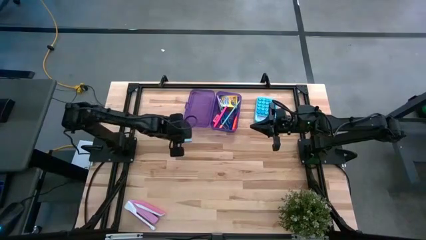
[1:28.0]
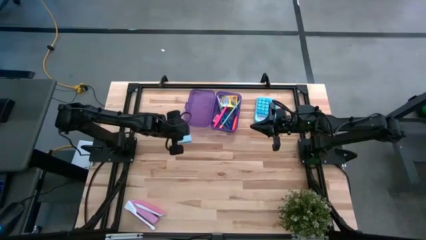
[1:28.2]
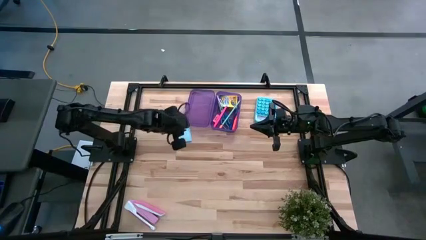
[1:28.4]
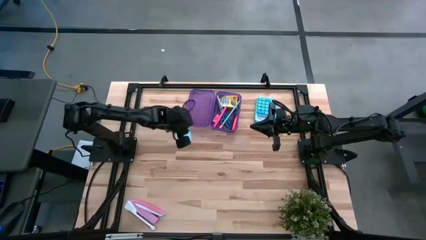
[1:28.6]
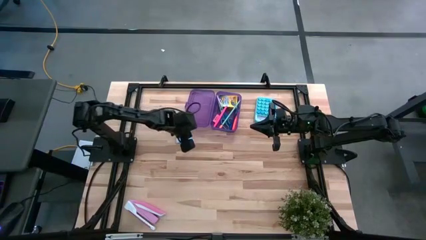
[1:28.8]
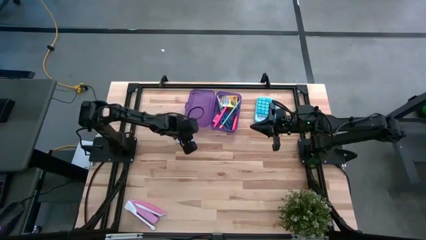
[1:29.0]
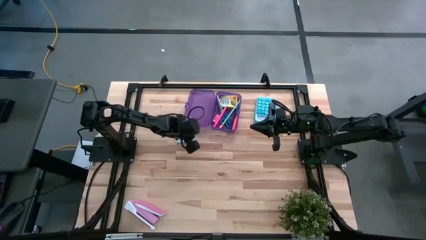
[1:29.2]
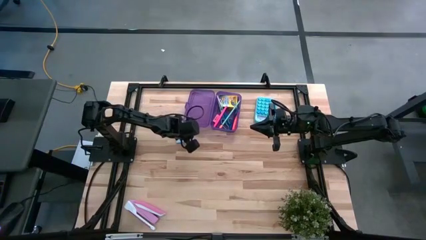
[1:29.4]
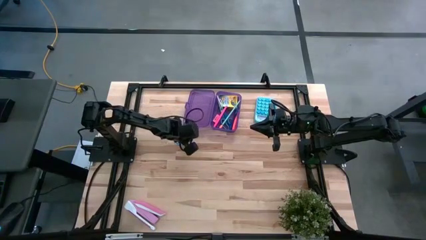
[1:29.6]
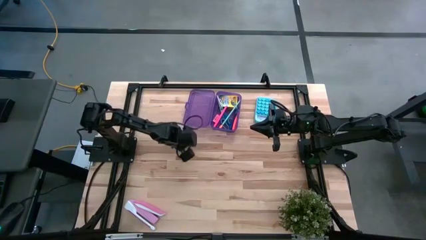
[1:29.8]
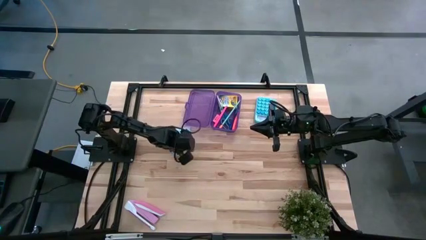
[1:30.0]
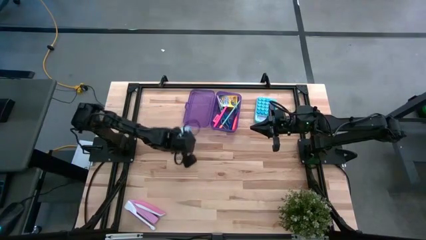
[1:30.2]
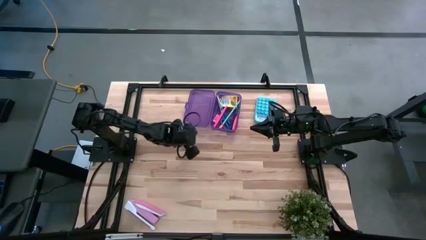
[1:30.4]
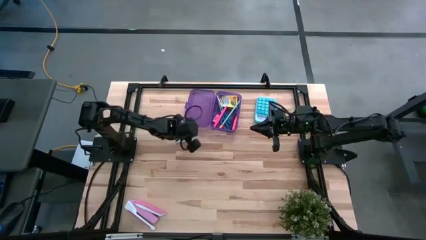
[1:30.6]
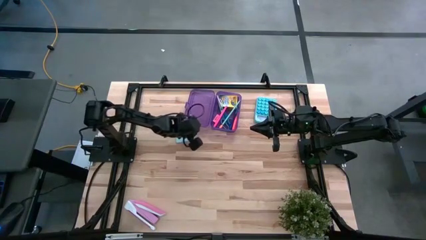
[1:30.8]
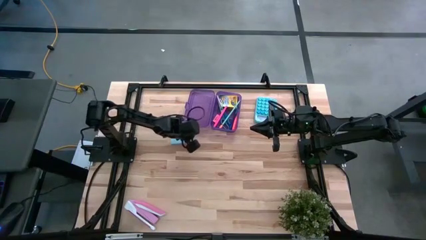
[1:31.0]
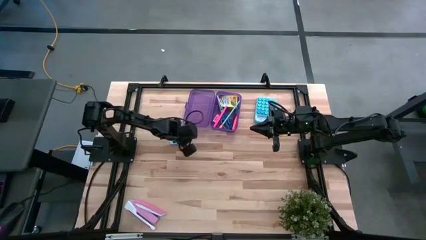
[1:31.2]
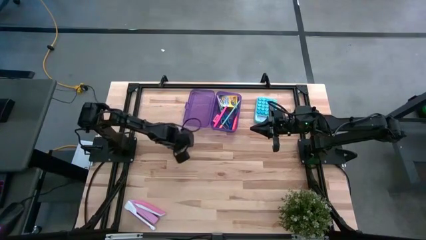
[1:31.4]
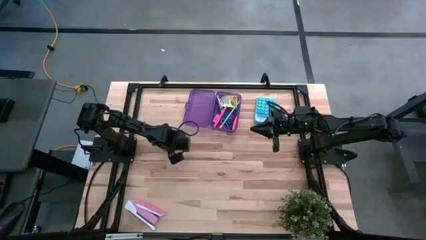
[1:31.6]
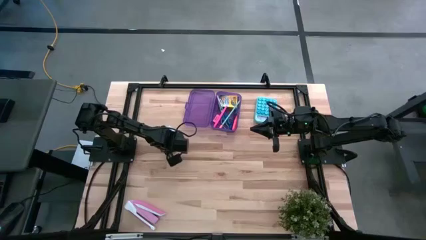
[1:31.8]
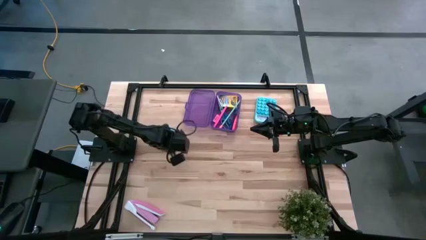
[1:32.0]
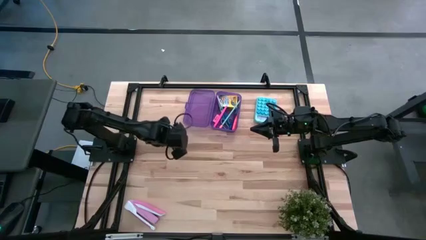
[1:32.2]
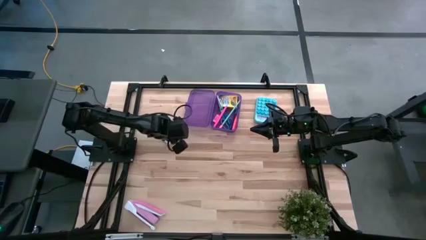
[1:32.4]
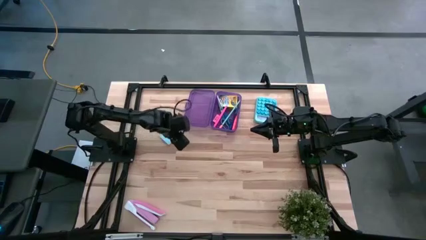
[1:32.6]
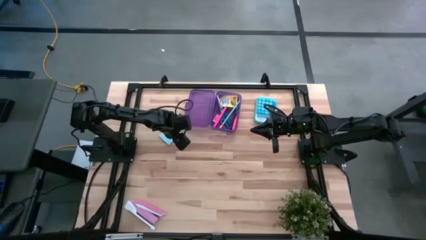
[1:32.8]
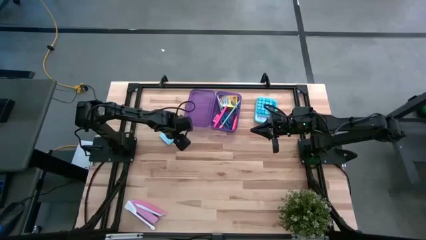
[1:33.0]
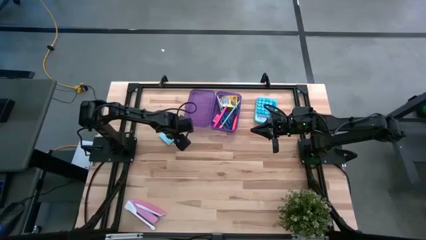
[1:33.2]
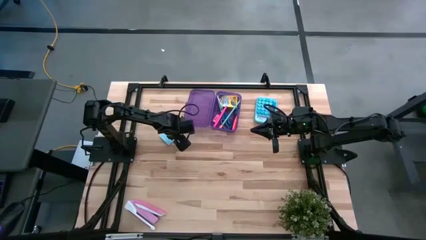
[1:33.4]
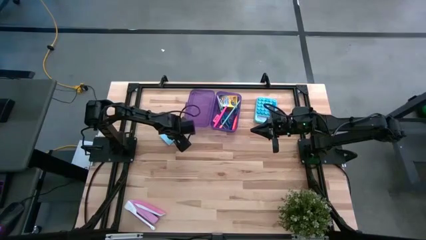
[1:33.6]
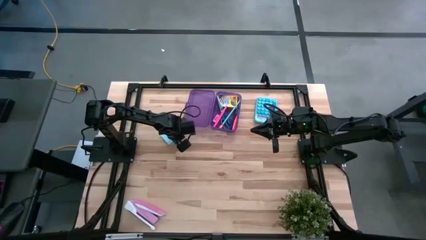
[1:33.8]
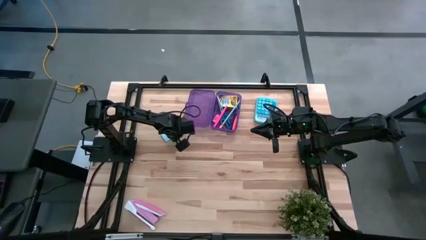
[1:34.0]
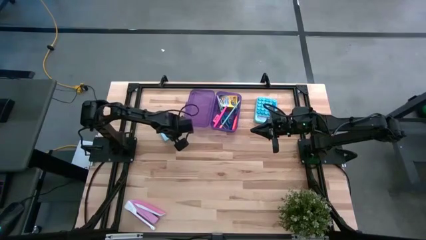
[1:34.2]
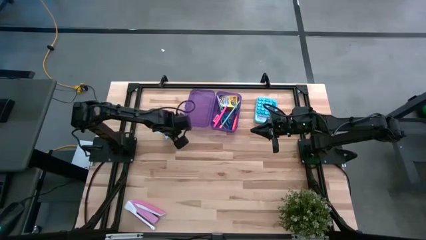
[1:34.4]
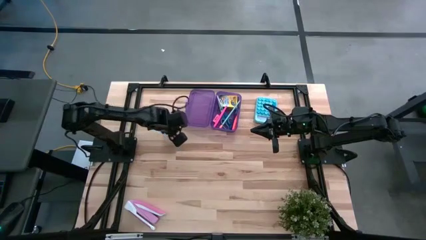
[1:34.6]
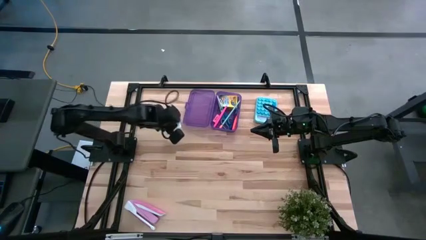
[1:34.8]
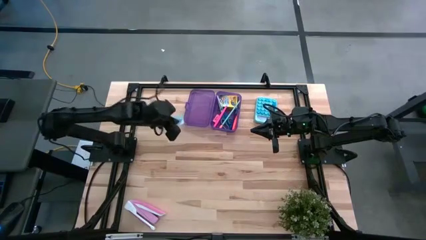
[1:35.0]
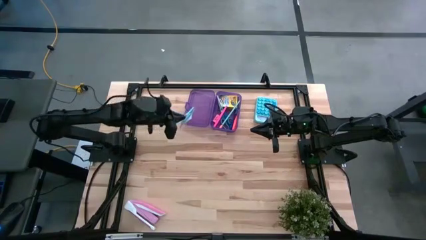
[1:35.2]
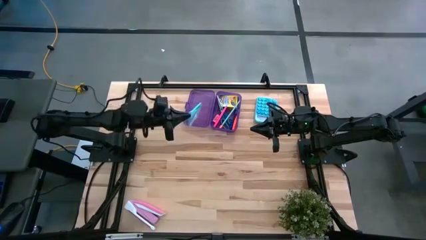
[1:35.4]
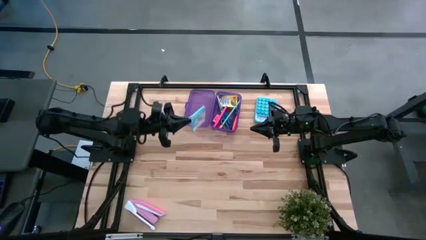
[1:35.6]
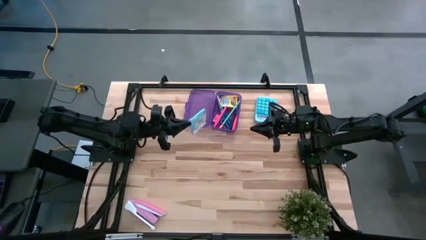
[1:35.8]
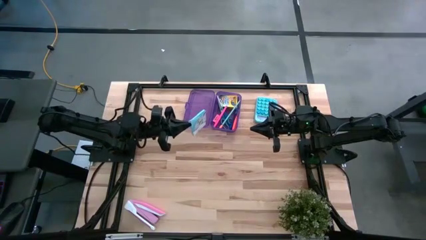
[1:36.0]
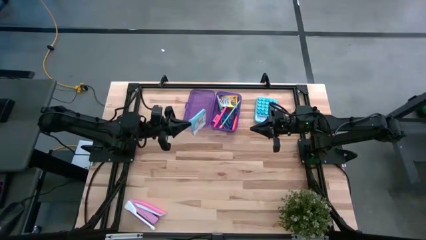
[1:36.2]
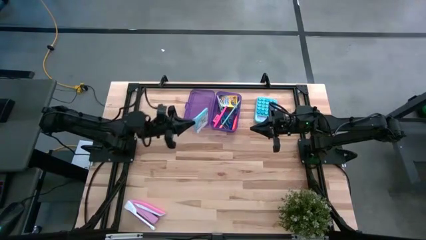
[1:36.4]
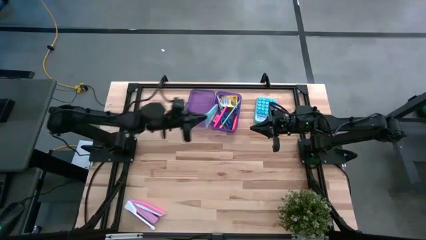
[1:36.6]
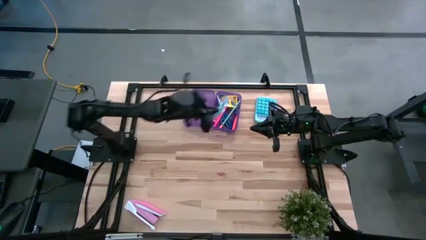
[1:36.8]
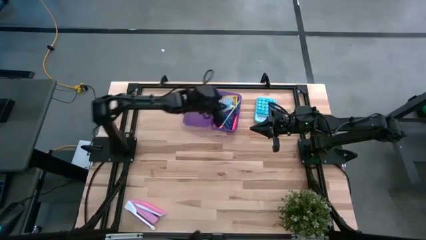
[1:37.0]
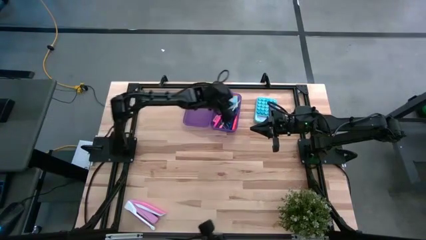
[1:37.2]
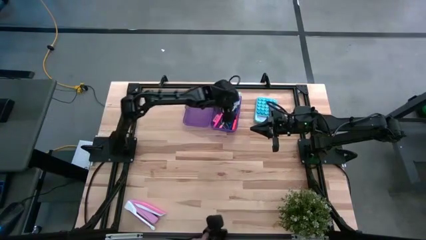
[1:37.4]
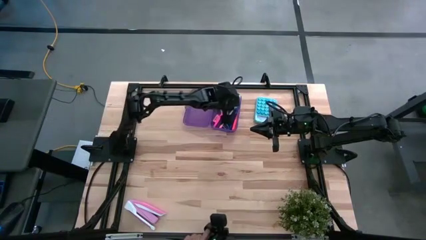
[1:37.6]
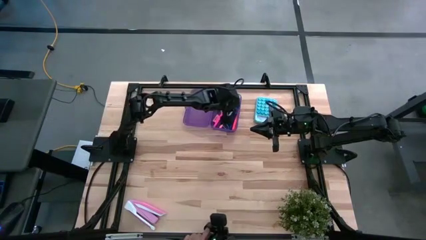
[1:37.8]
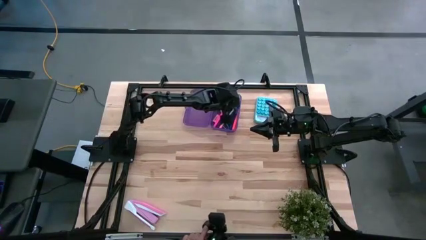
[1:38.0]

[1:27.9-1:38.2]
Task: Pack school essentials
Put the blue sticky note into the purple supply box

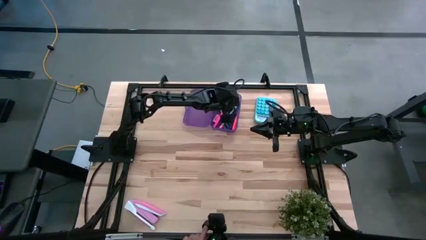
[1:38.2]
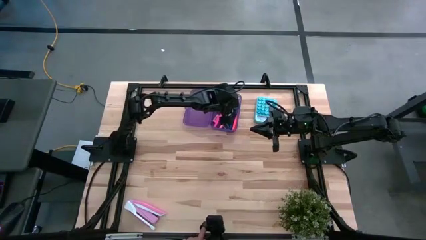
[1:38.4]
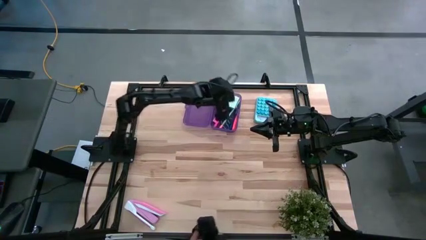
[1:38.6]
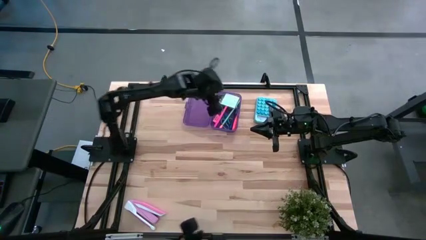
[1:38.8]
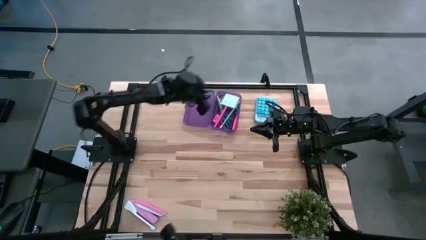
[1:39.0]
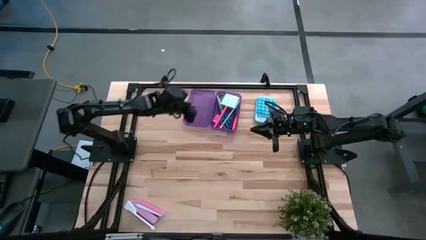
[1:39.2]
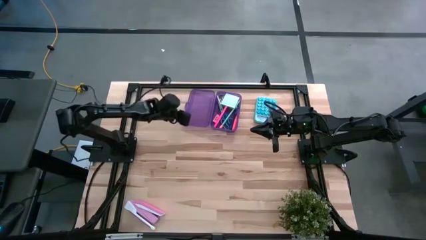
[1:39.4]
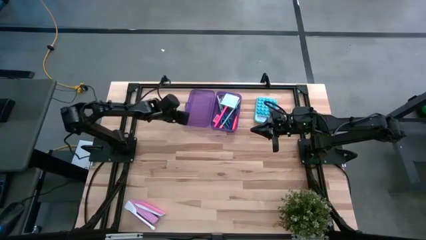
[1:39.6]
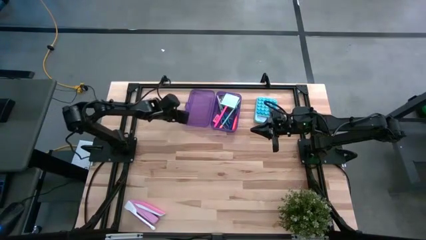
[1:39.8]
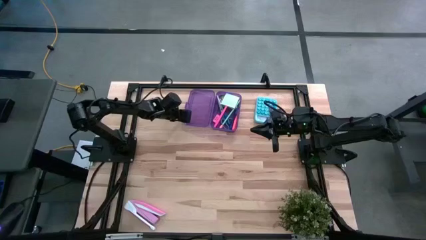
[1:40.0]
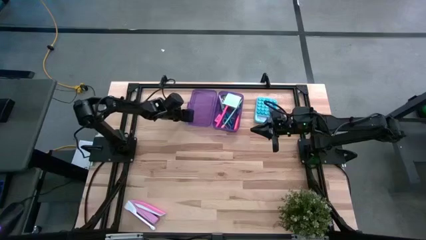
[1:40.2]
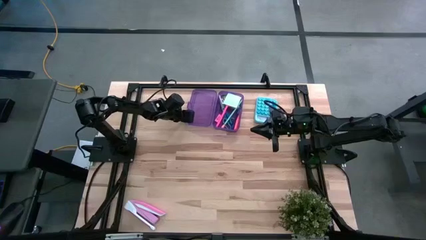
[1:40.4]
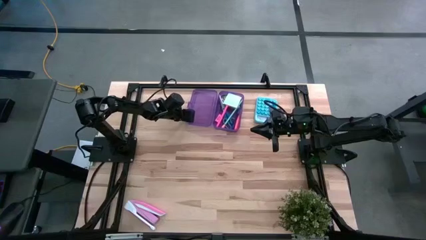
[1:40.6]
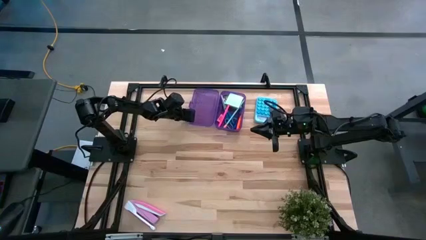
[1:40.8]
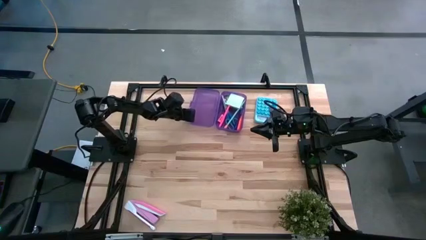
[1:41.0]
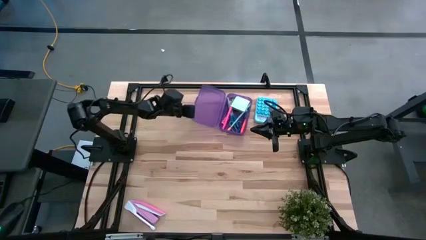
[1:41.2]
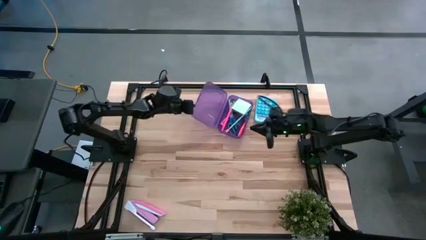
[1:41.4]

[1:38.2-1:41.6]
Close the purple supply box

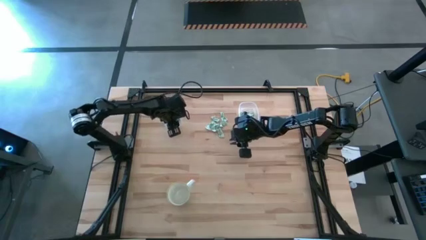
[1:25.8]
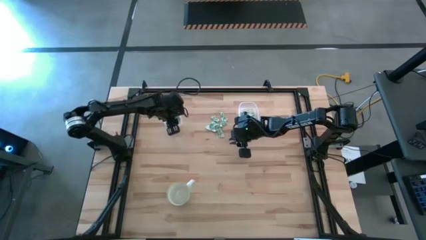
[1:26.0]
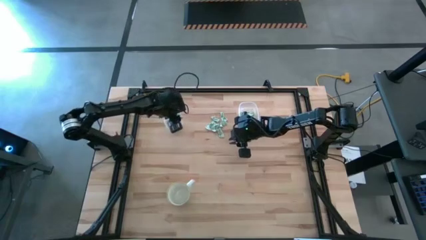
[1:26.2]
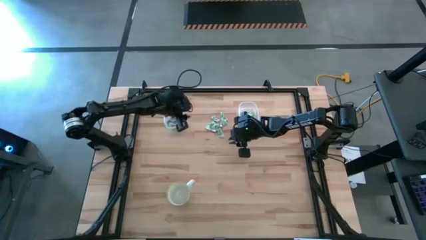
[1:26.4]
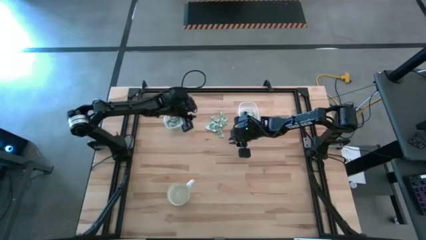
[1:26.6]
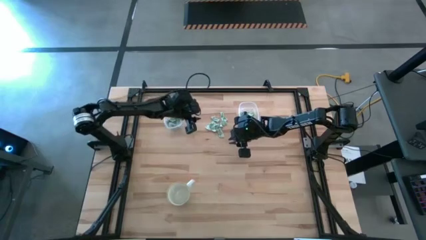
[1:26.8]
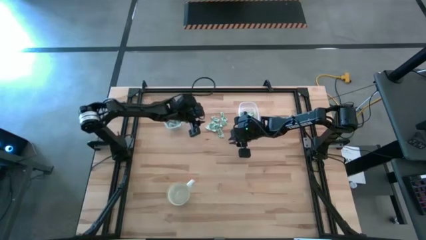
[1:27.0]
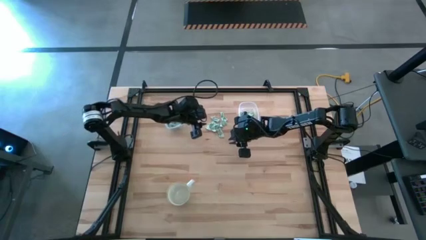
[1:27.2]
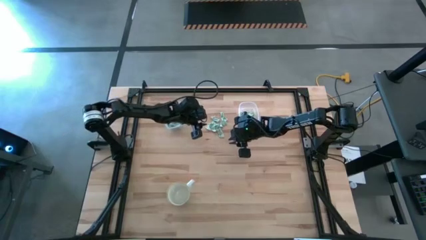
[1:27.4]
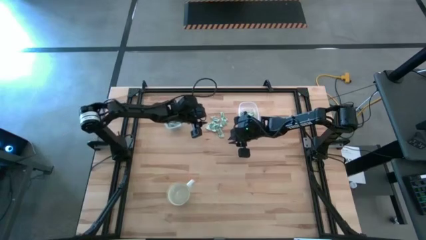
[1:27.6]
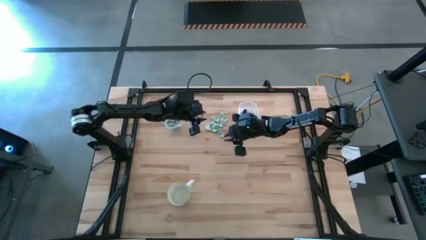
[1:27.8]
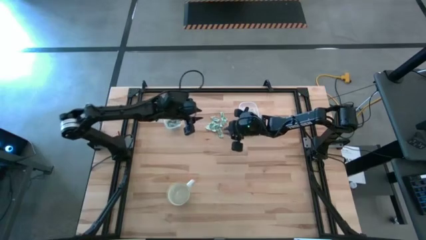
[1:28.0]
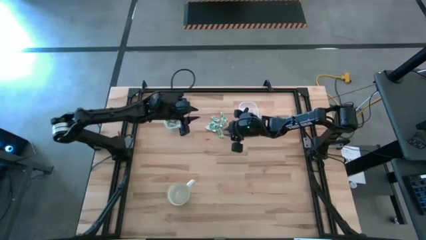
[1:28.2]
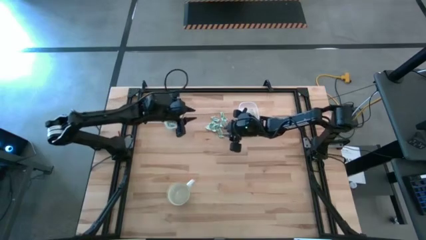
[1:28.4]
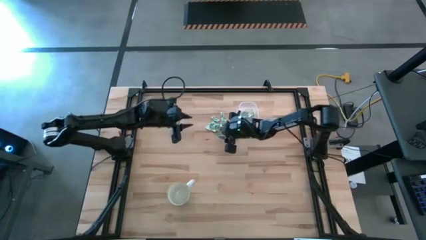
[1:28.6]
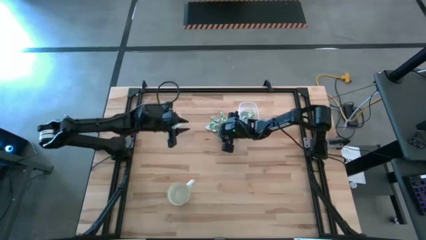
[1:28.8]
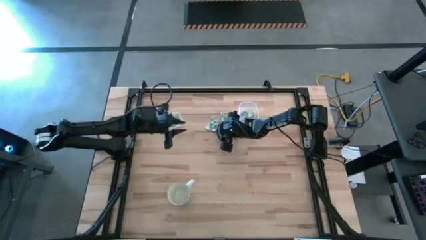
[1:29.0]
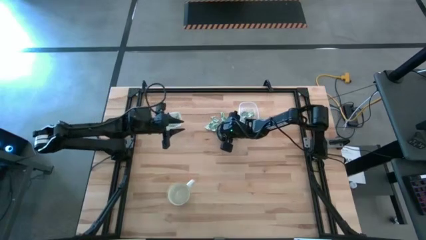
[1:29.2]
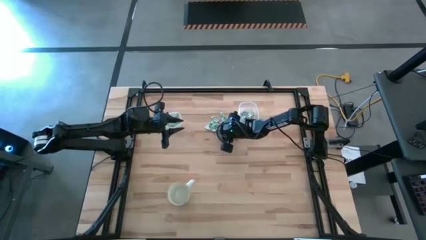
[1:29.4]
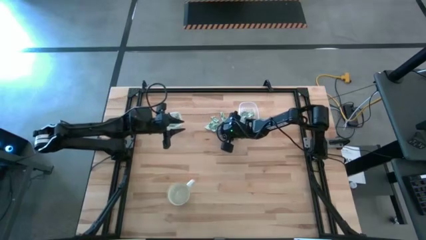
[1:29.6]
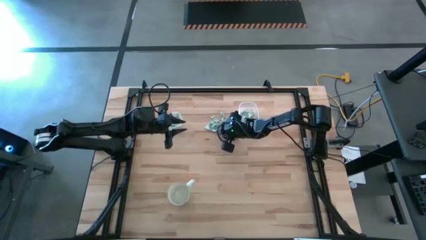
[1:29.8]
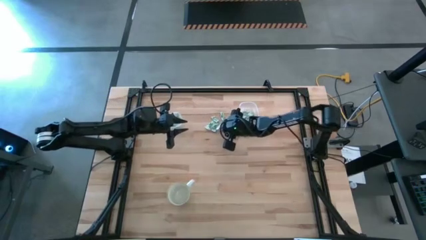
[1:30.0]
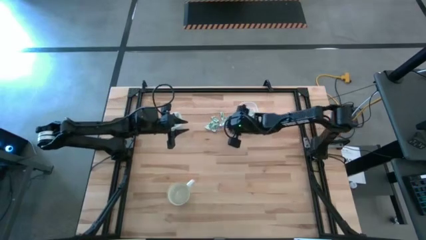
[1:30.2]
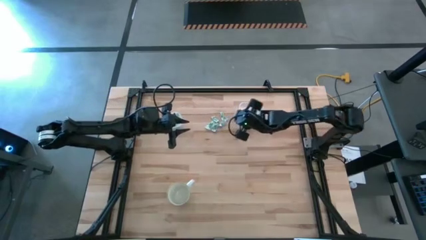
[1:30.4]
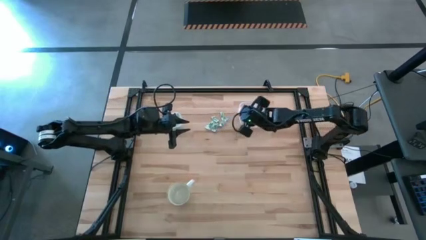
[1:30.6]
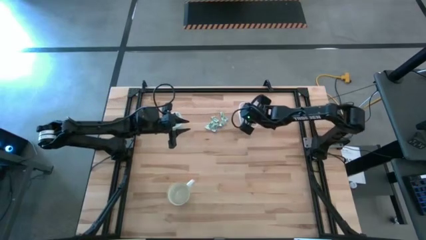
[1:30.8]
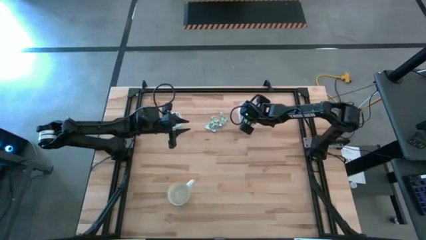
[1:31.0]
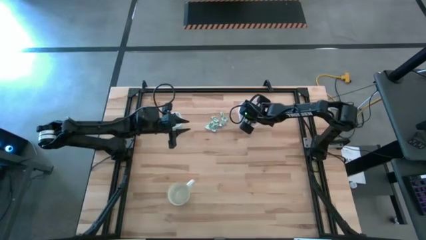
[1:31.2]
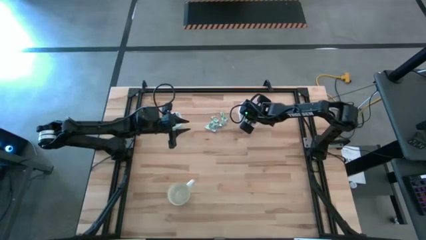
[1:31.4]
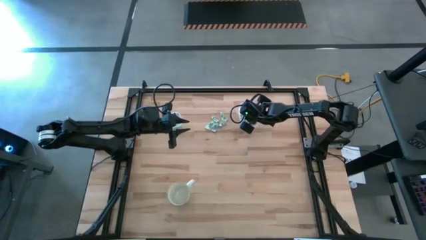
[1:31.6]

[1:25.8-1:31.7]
Task: Pick and place items into bin
Put the green stevia packet into the rectangular transparent bin
